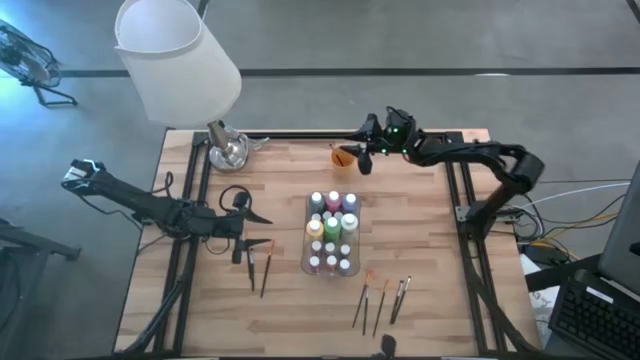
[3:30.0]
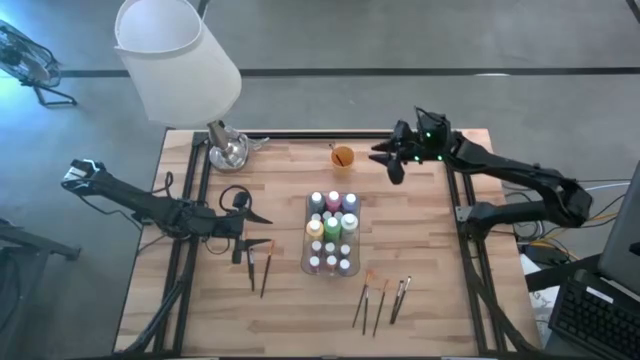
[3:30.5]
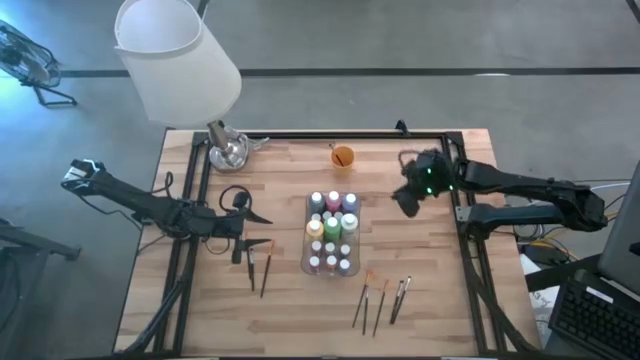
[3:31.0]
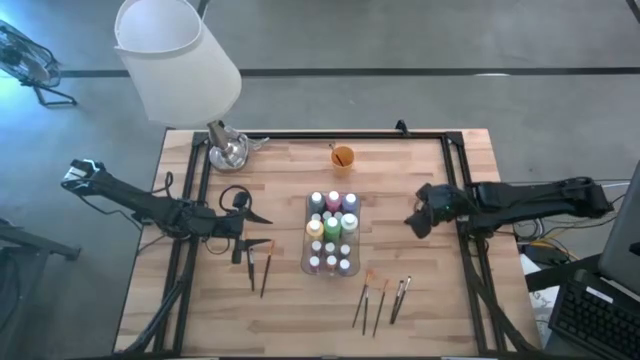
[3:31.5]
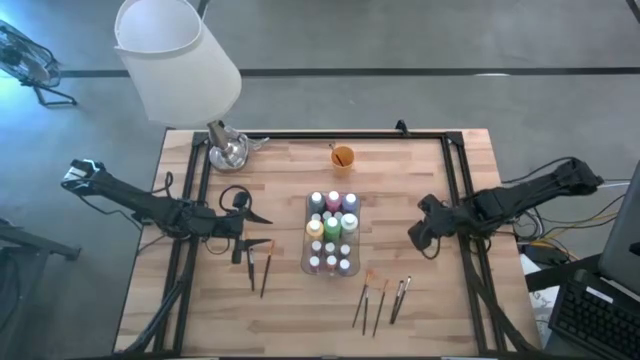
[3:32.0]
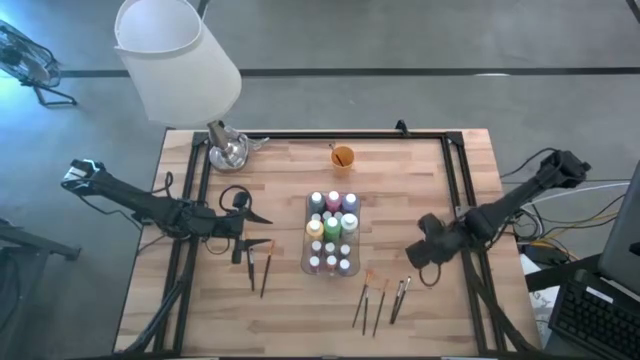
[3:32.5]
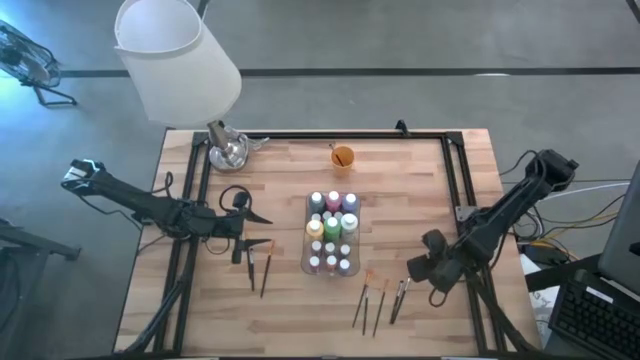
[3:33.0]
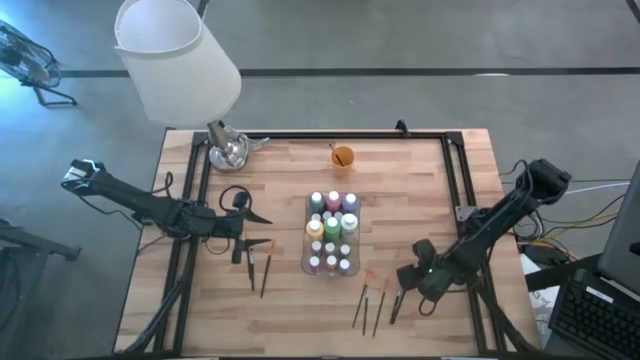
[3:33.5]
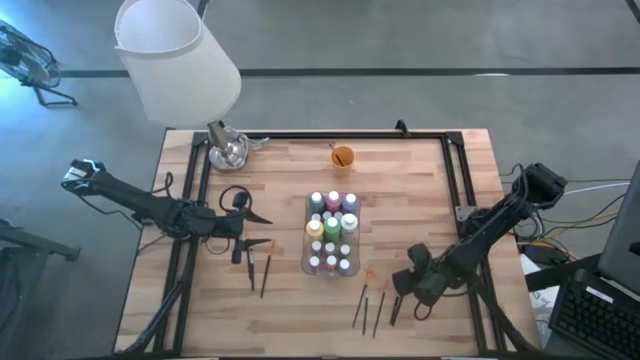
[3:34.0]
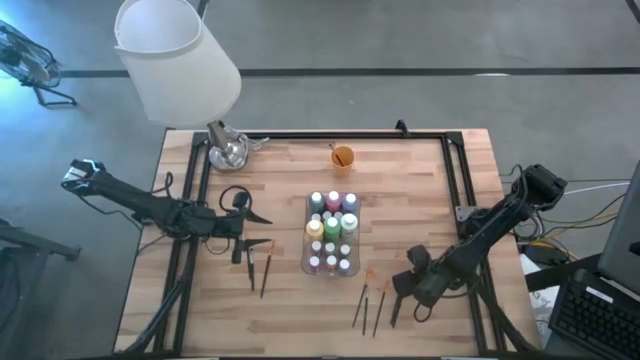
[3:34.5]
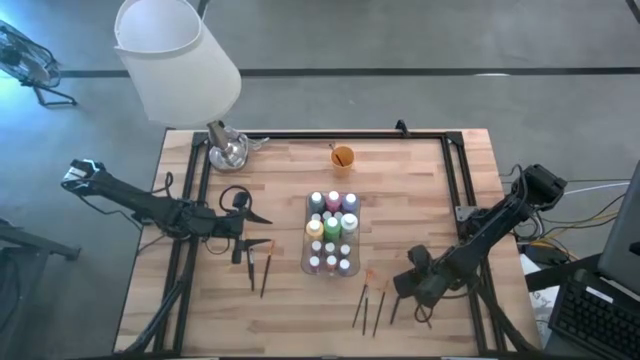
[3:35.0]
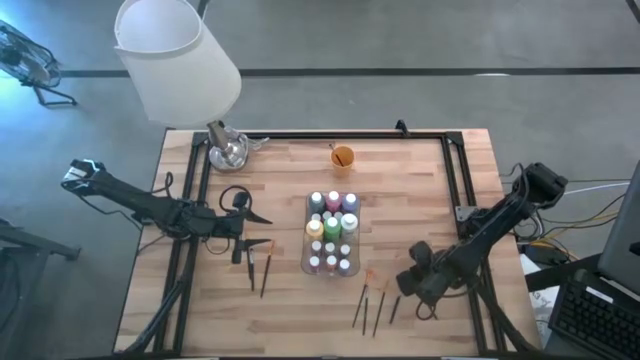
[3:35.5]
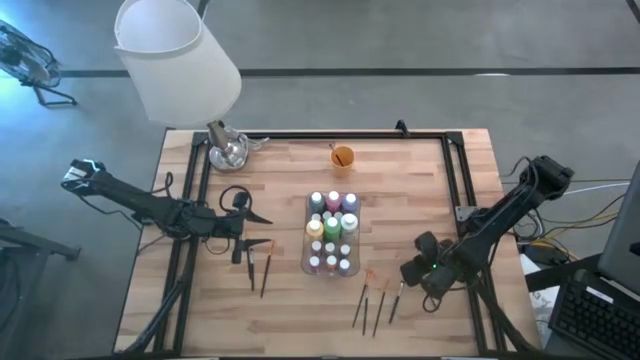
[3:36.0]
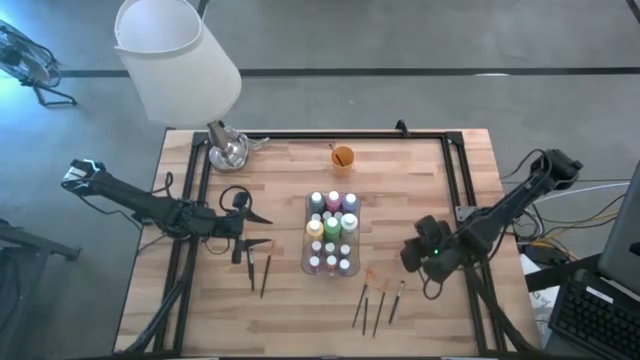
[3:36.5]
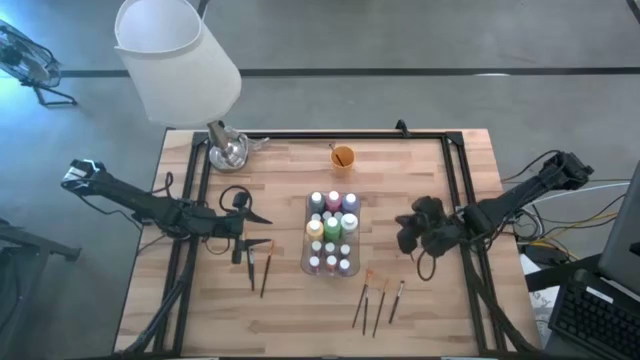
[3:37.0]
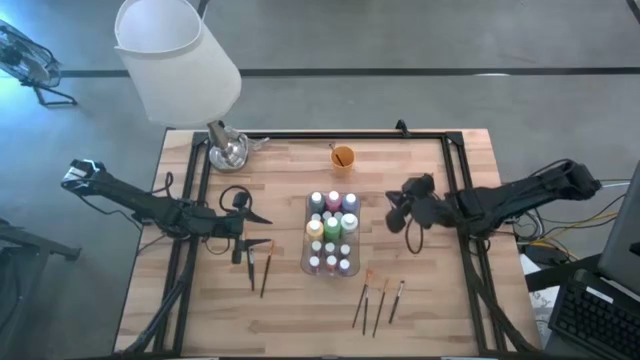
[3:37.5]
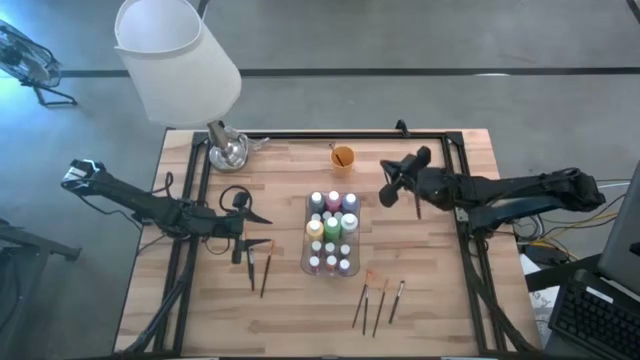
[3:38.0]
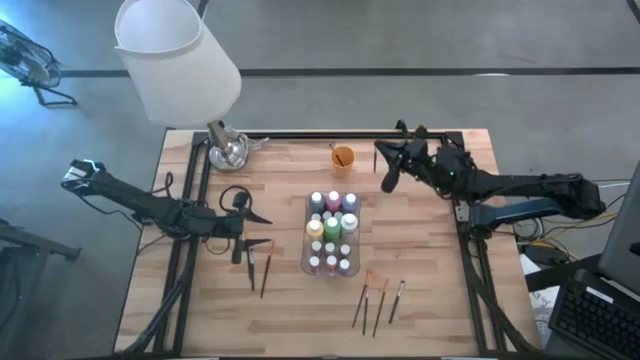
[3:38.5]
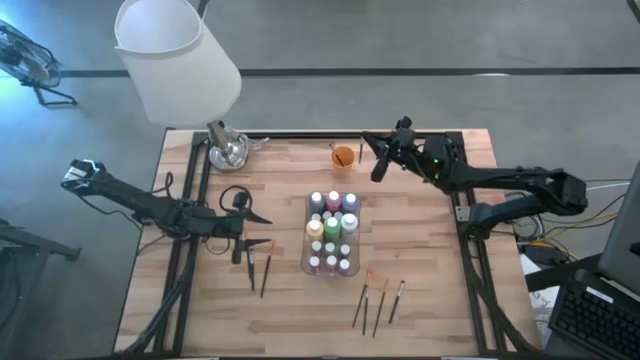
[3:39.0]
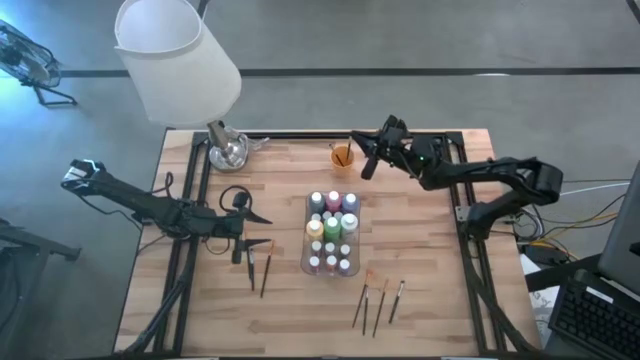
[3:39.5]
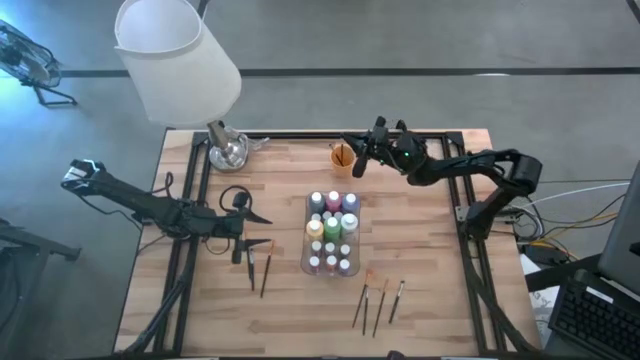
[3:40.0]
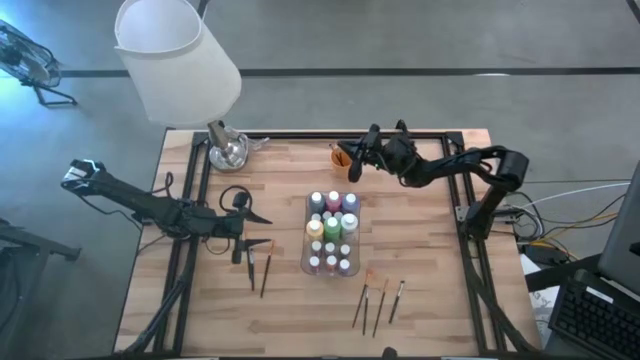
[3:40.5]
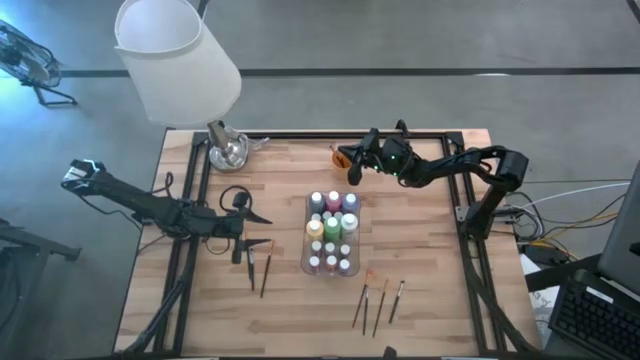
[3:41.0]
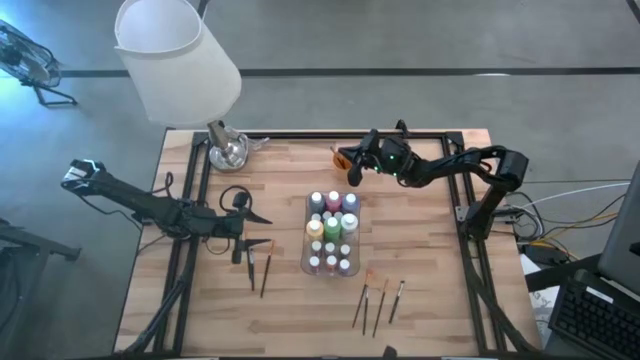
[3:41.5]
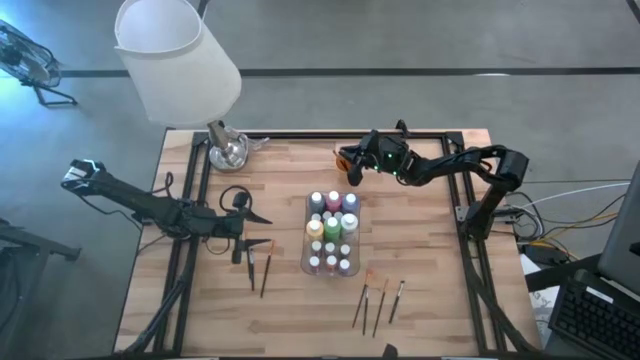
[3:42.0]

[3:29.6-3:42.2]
Task: Pick & Place Paint Supplies
Put the gray paintbrush into the yellow cup

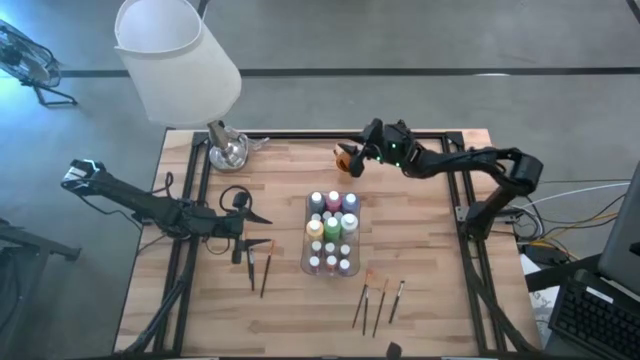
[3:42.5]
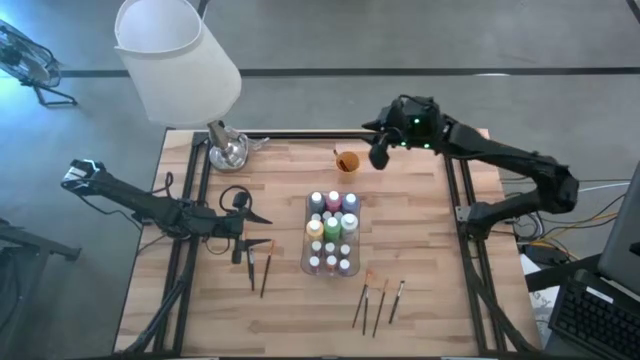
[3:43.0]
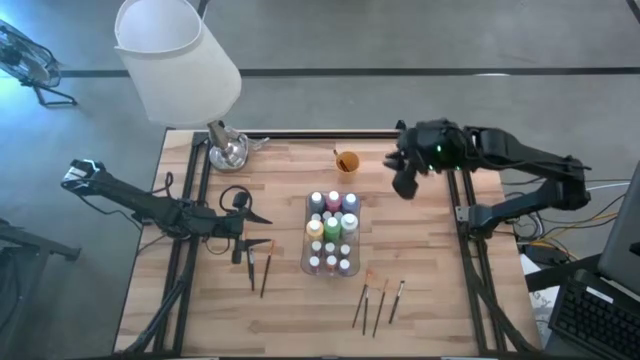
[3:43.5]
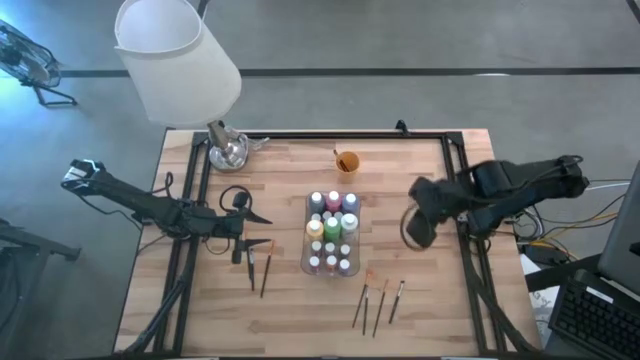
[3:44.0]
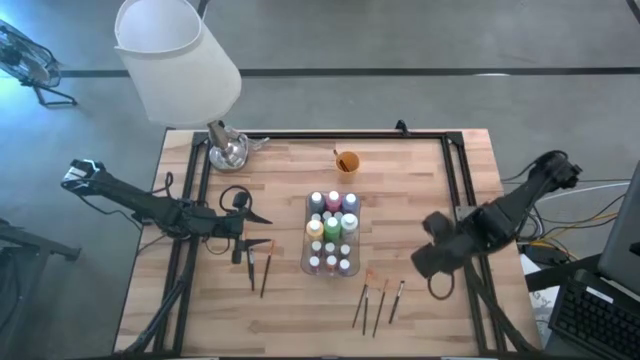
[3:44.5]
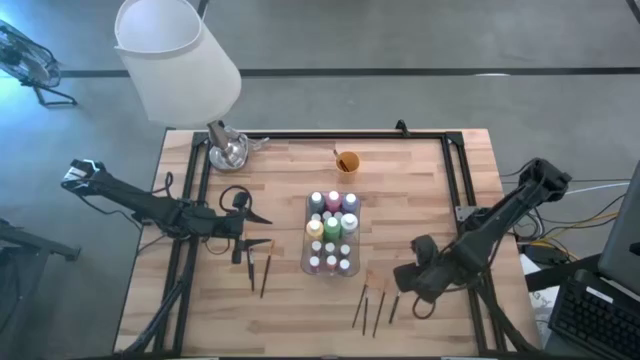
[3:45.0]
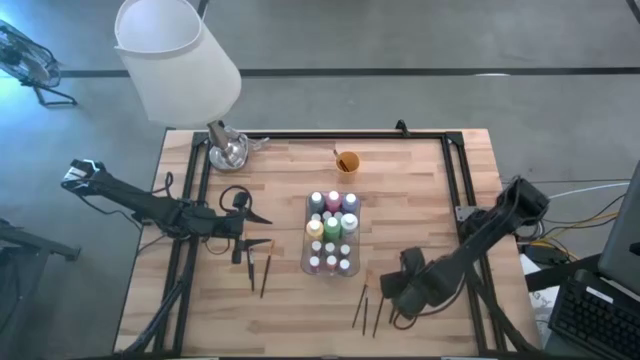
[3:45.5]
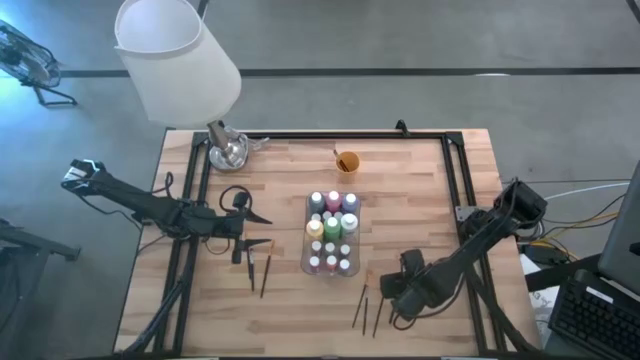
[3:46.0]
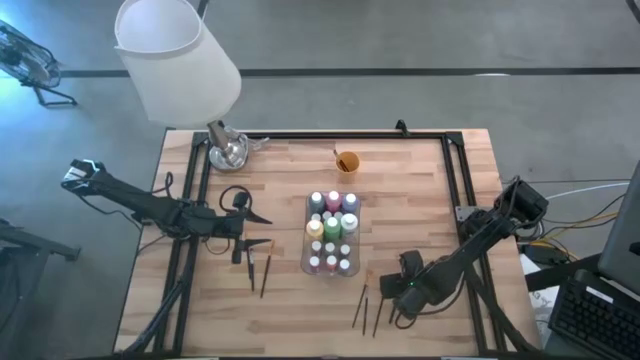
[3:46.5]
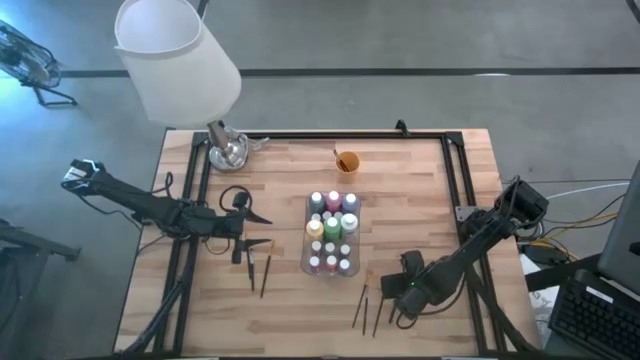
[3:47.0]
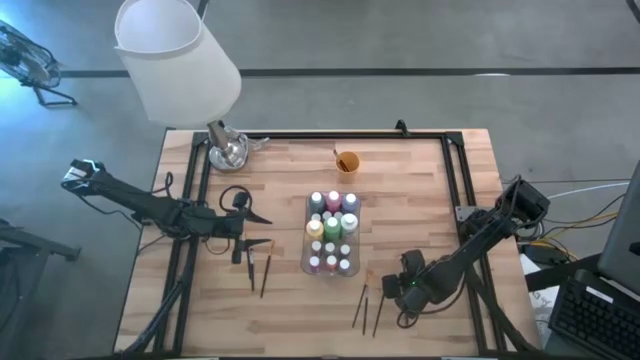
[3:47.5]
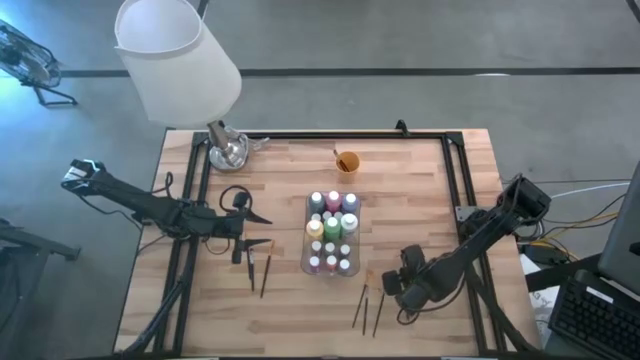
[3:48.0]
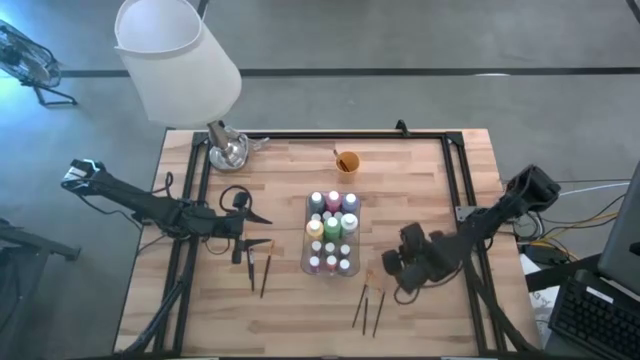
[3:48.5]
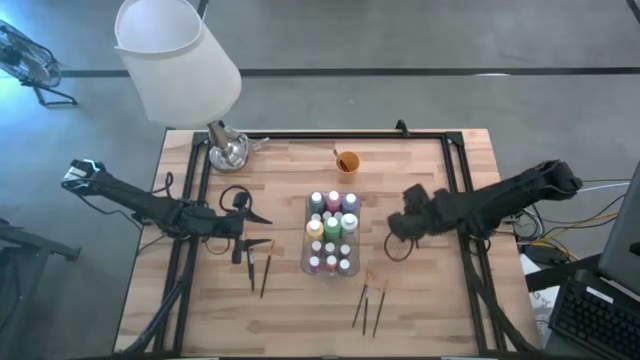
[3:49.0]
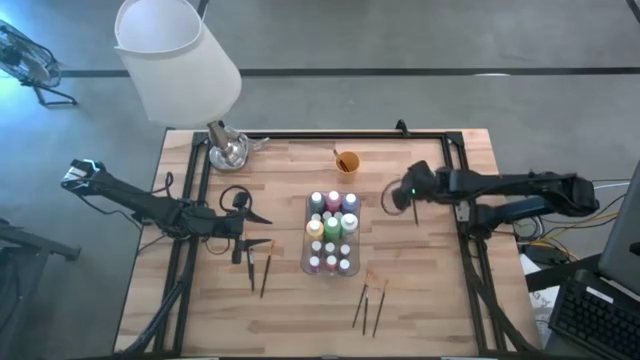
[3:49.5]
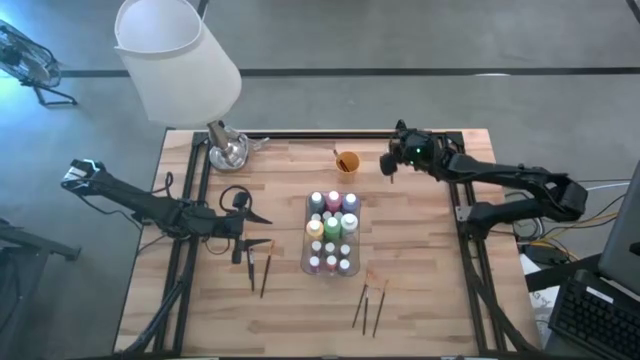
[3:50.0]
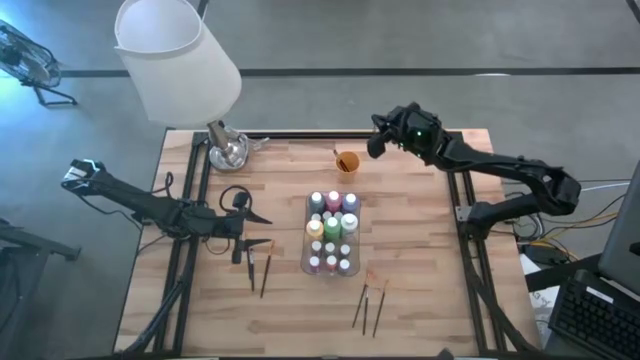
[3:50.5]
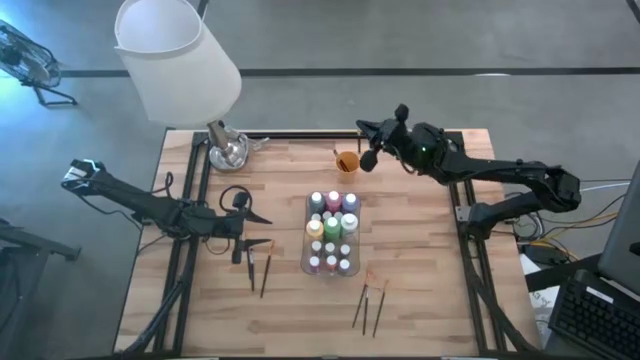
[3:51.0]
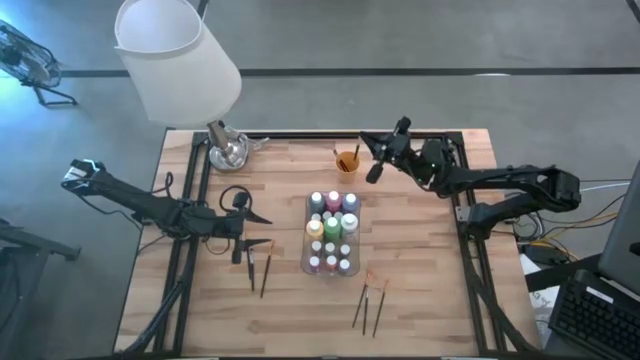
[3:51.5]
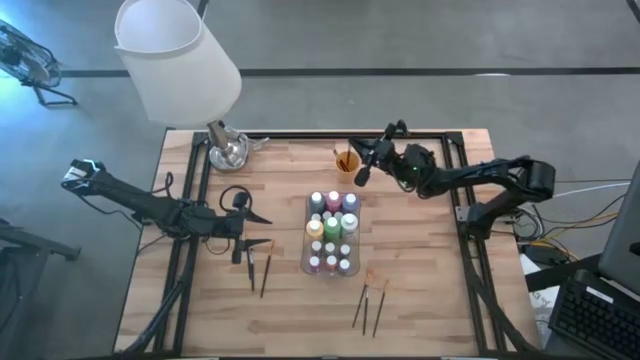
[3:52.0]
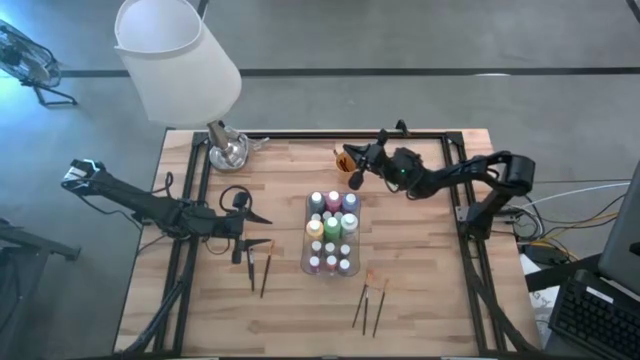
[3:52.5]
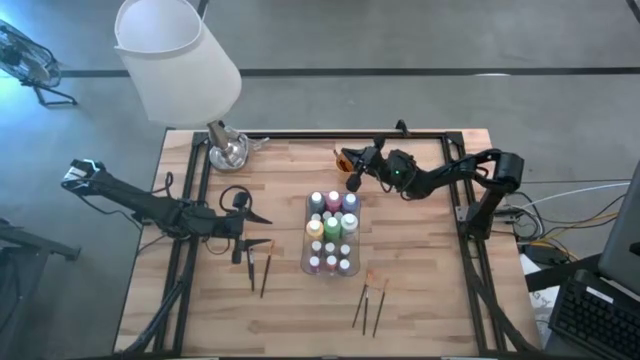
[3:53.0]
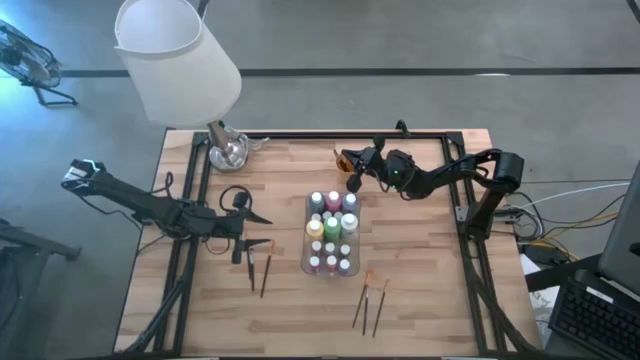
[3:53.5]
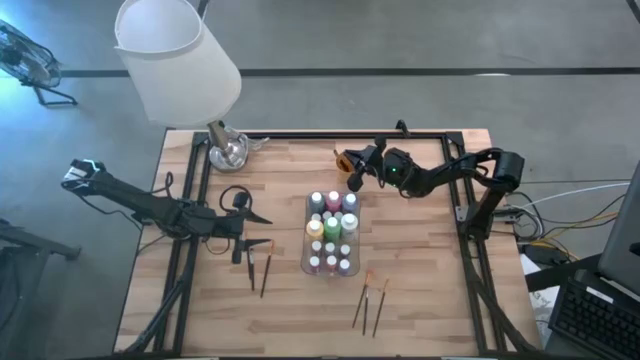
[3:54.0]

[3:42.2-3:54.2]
Put the gray paintbrush into the yellow cup
